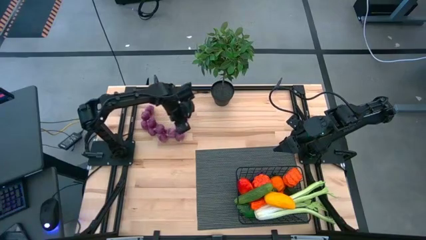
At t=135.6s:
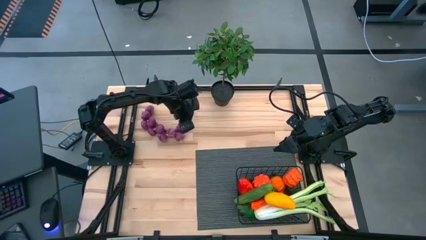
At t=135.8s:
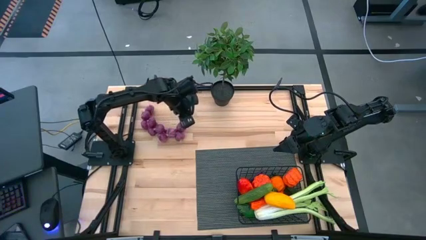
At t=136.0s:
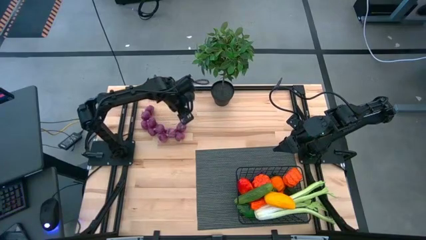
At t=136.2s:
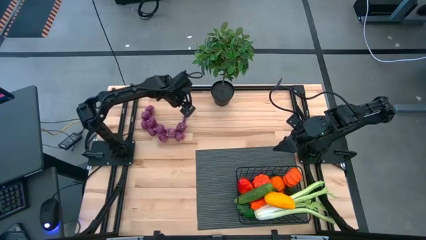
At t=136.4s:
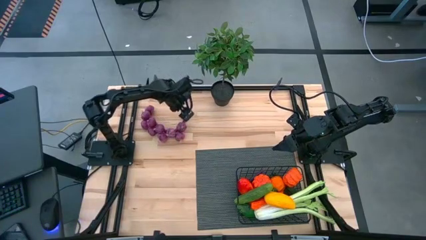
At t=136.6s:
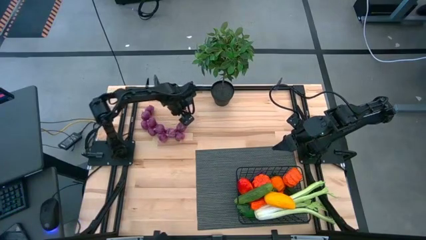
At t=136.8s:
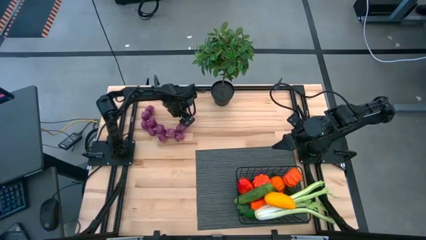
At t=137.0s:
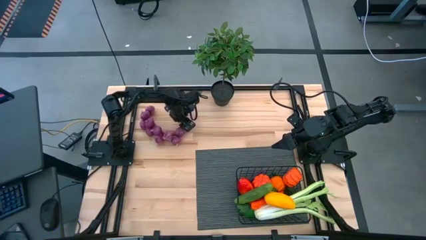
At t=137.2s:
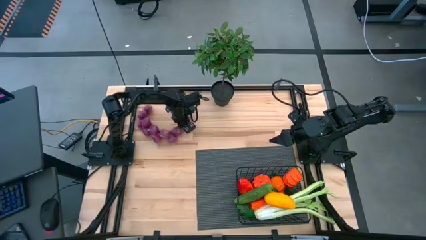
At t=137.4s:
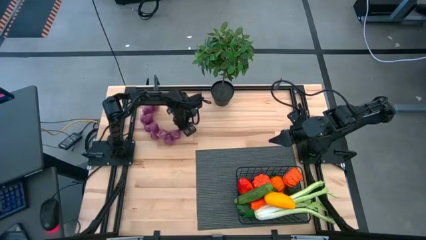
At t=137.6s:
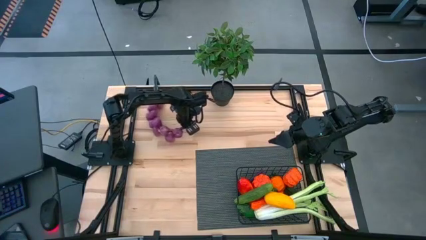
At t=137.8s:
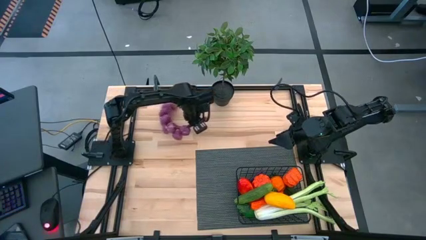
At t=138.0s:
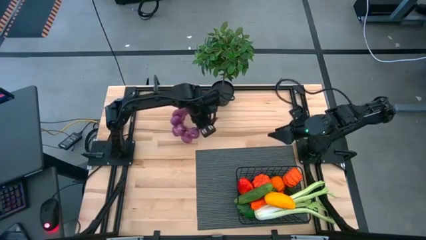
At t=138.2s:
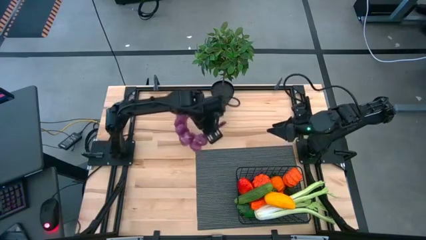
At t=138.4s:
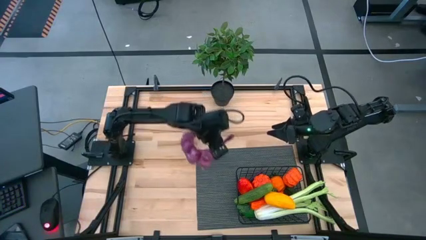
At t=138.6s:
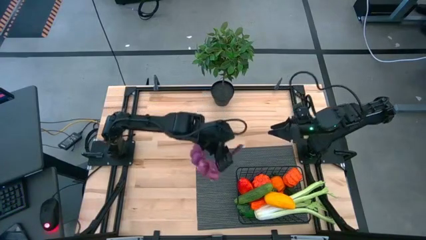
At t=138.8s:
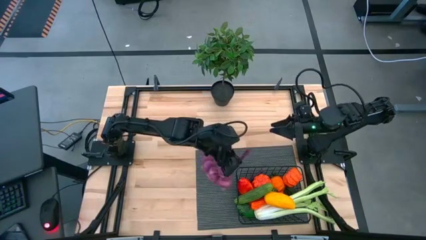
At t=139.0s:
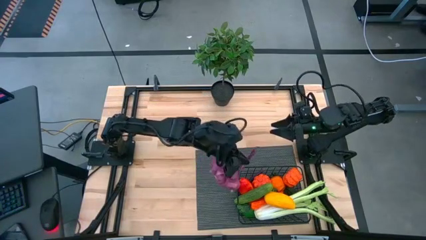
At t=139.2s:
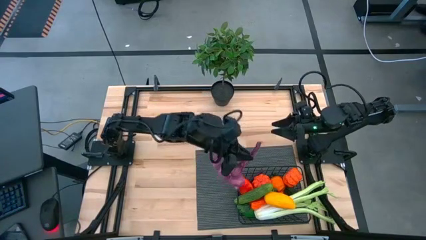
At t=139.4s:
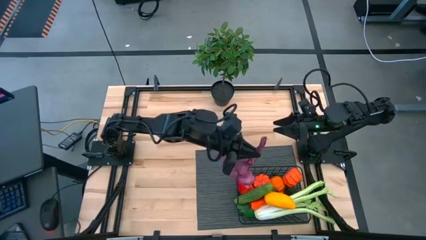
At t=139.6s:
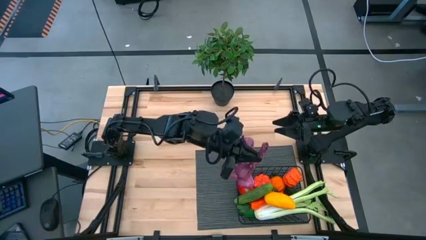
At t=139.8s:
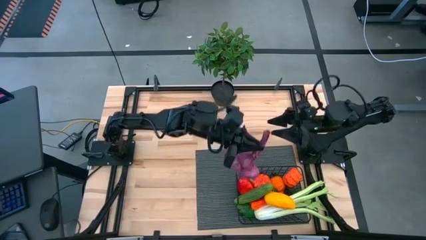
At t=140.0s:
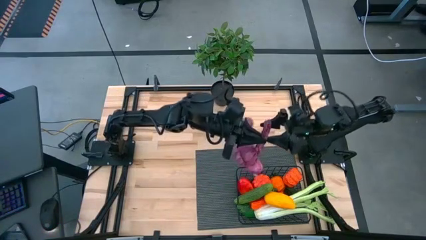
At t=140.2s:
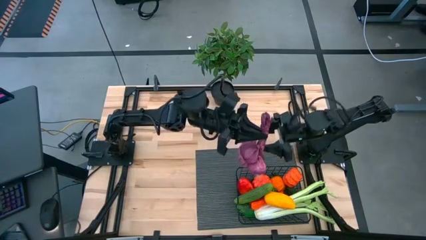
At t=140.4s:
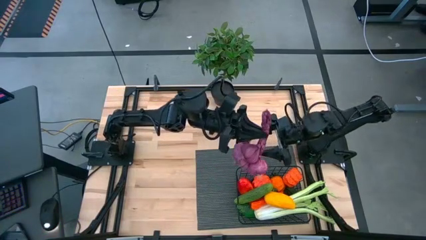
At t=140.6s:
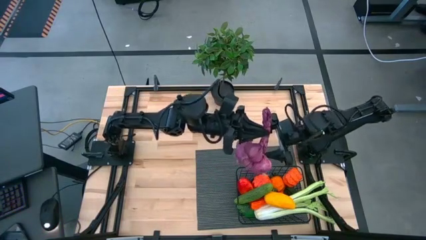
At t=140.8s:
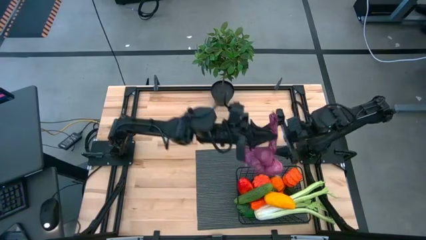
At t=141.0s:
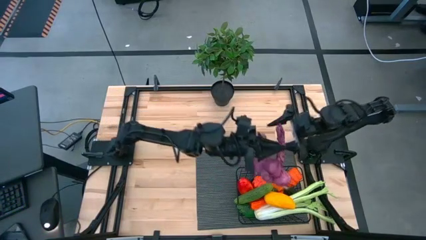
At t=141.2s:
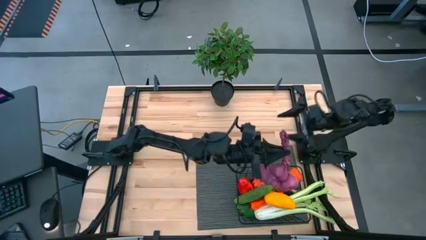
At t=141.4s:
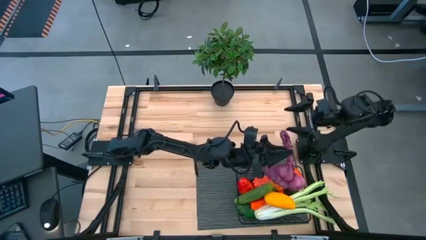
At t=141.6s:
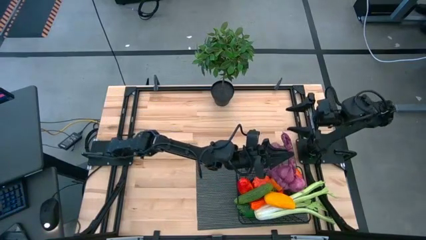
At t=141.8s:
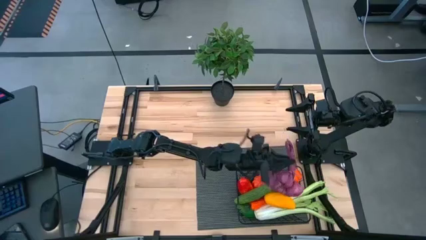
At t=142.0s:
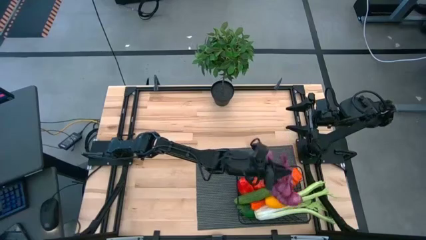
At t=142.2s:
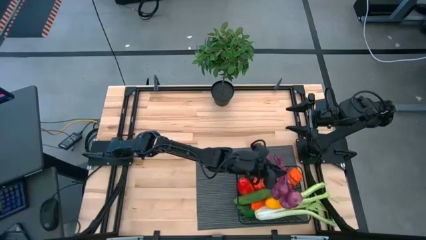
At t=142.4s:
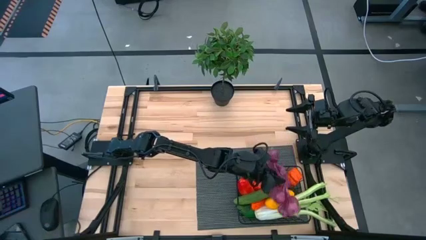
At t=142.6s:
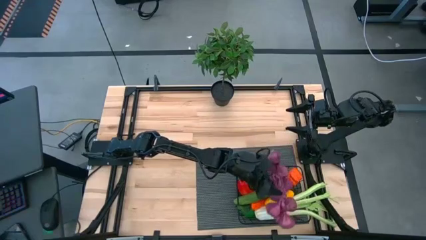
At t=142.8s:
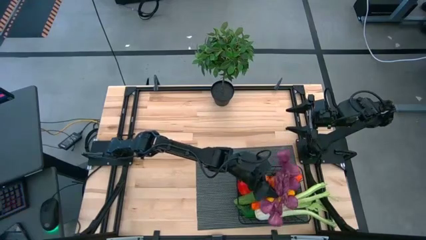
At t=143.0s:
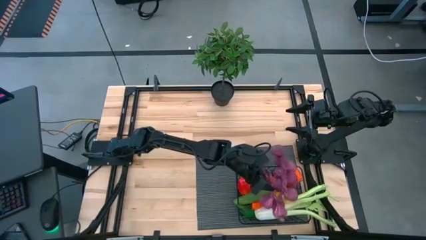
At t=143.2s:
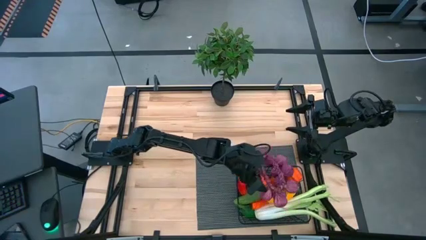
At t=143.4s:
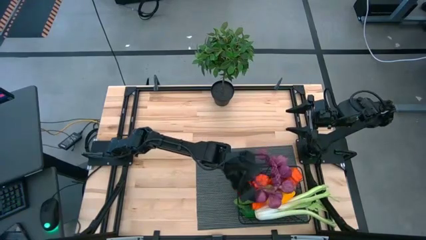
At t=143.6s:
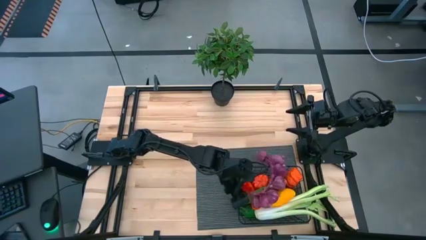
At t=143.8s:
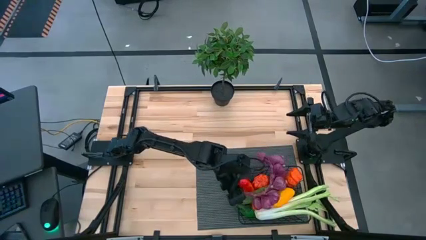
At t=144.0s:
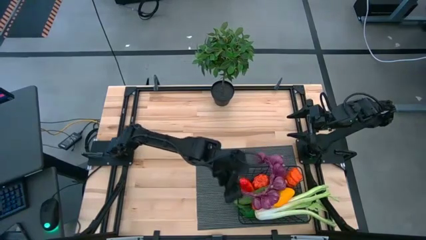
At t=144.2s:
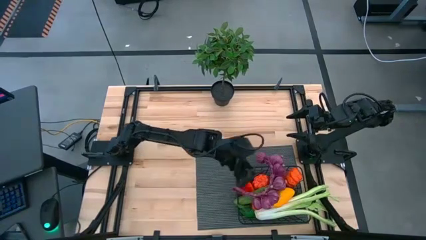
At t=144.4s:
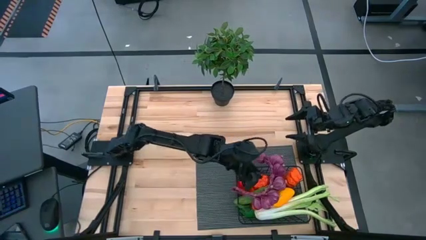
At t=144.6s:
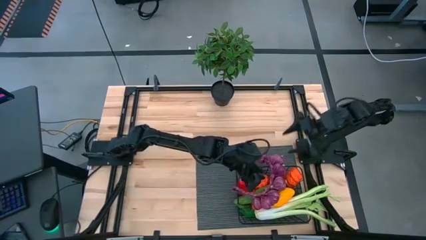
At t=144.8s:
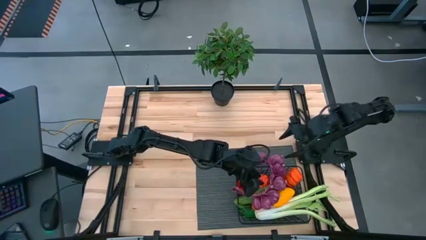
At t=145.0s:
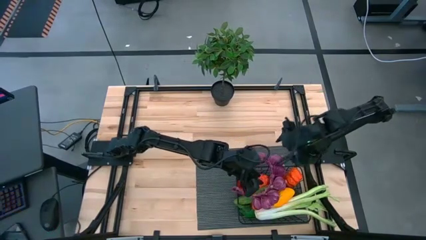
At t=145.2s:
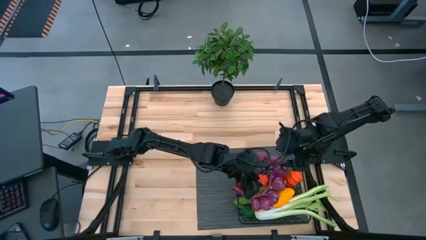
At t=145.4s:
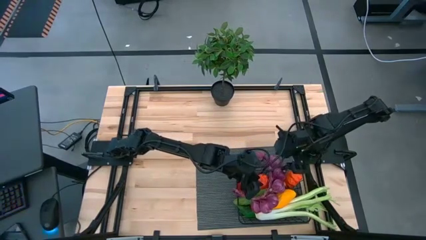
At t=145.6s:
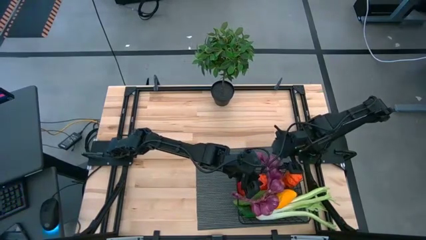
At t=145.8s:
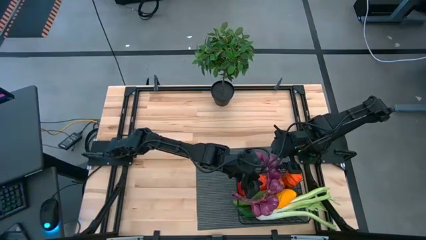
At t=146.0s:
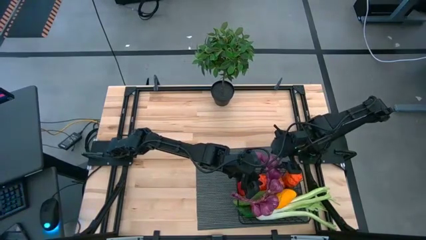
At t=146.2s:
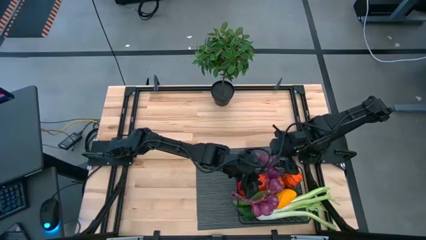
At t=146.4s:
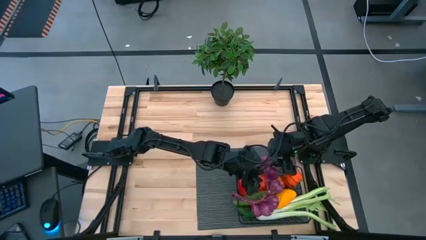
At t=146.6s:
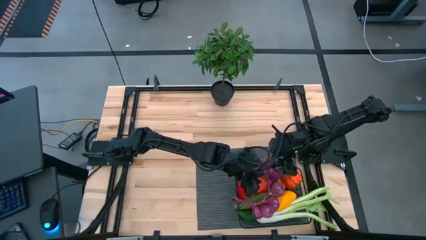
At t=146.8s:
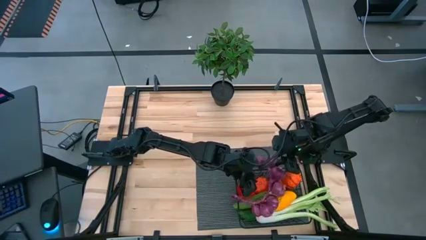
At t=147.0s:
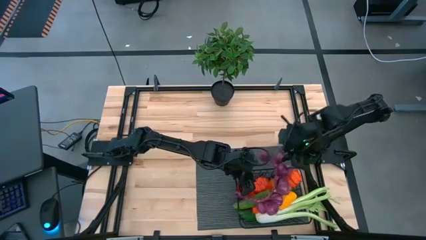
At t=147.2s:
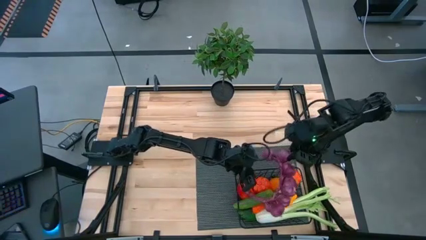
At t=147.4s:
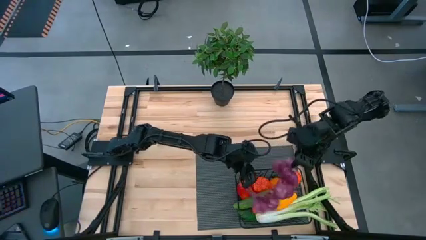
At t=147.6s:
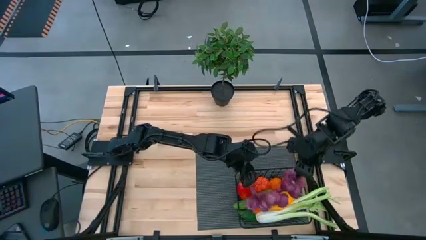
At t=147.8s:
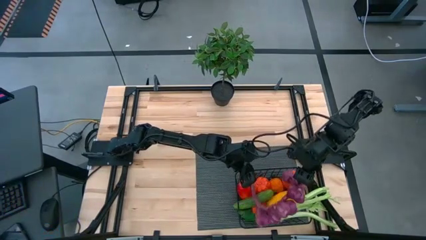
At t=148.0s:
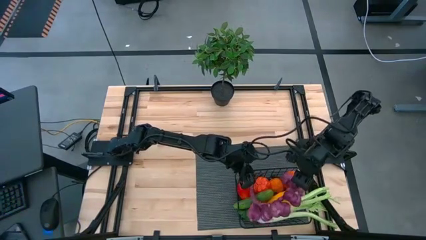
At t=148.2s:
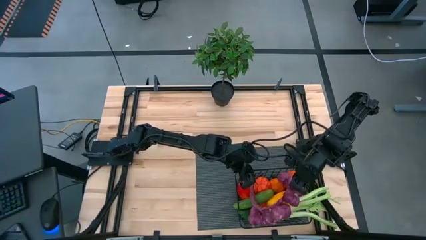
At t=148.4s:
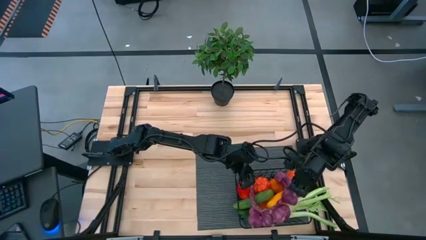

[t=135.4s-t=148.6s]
Task: Build produce basket
Put the purple garlic into the black wire basket

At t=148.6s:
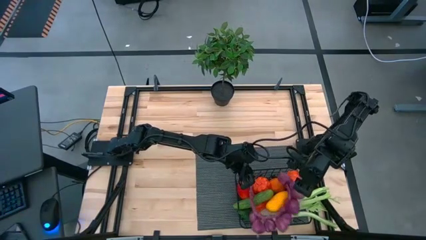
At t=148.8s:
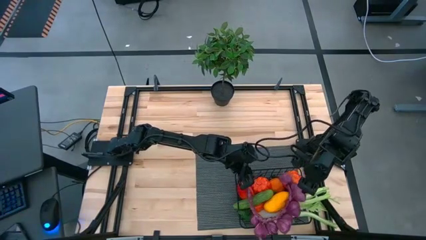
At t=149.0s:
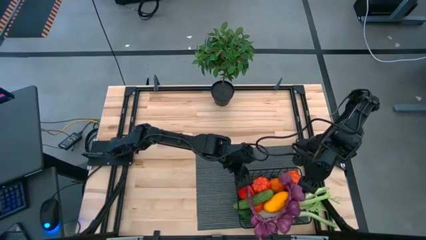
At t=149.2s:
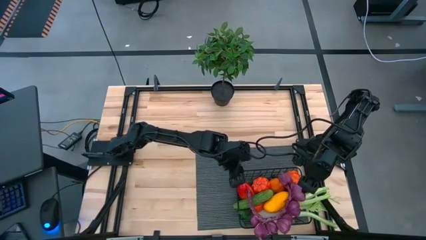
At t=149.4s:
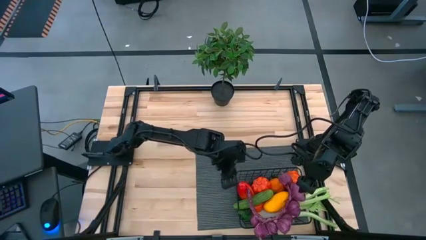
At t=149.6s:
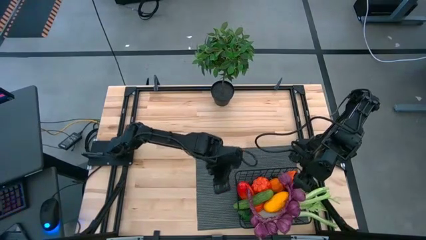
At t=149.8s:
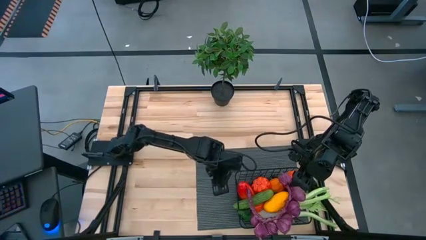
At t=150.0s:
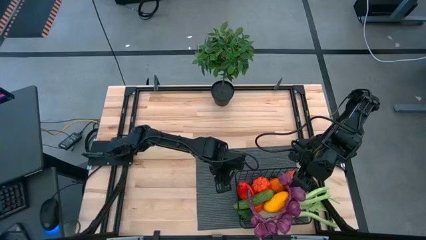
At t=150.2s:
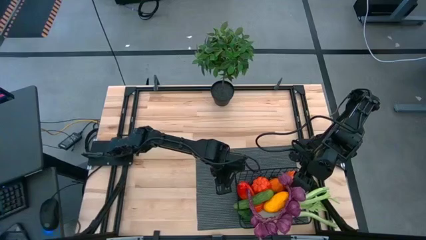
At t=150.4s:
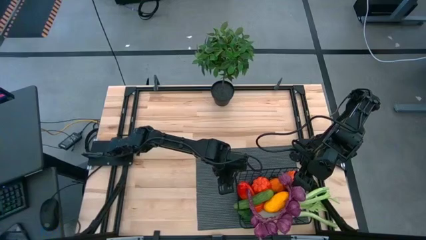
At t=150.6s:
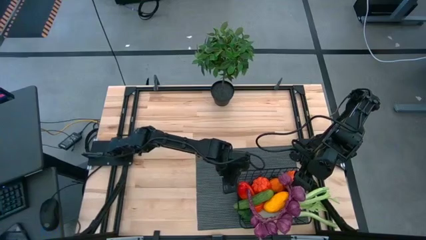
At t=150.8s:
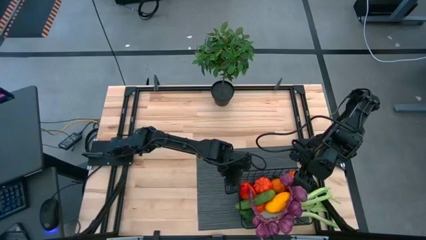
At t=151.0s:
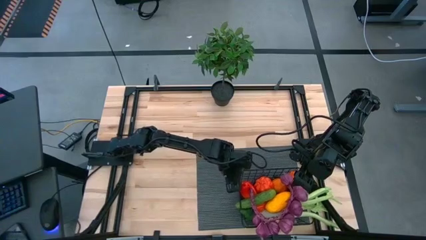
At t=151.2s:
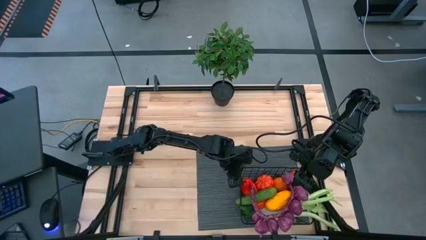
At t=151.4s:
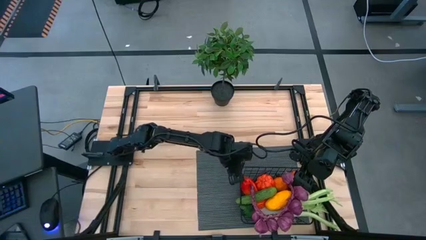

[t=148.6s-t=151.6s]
Adjust the black wire basket on the gray table mat
